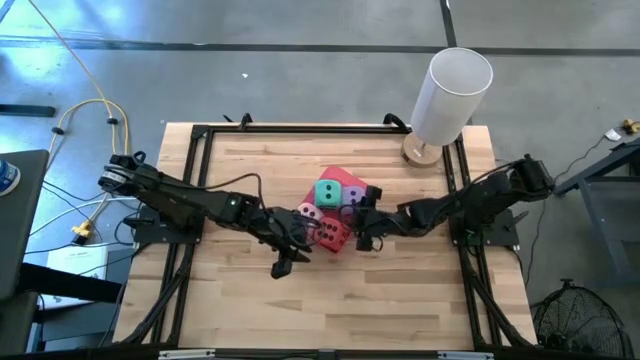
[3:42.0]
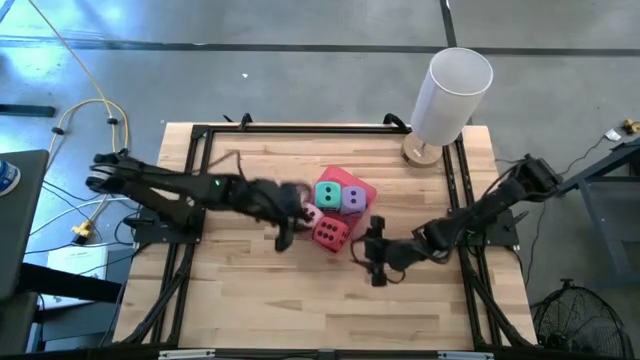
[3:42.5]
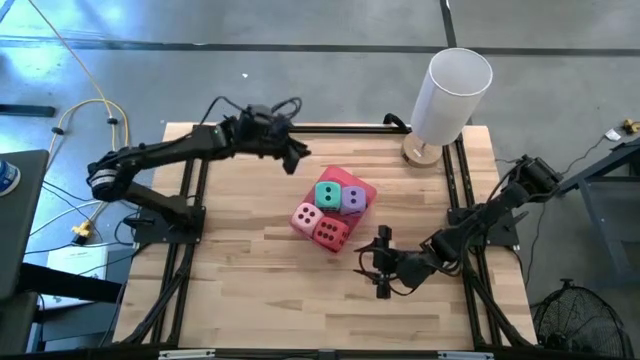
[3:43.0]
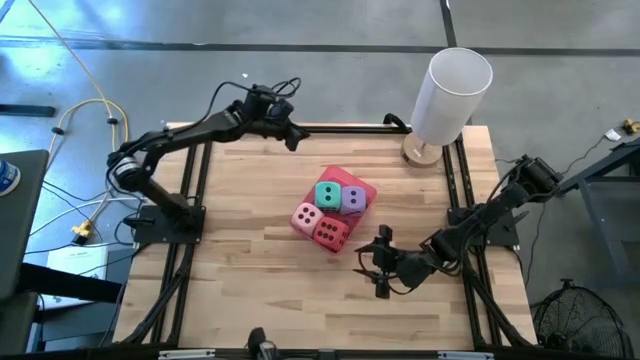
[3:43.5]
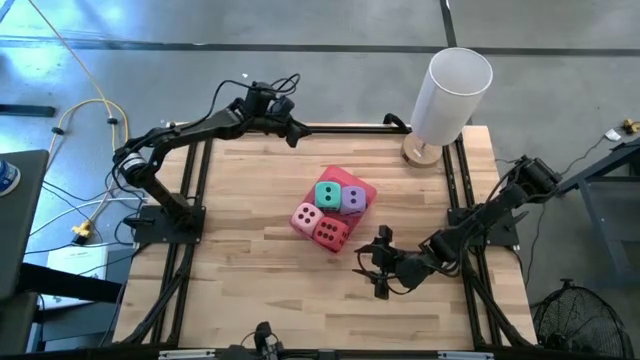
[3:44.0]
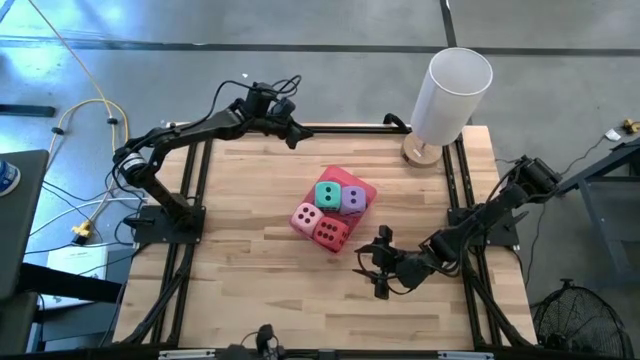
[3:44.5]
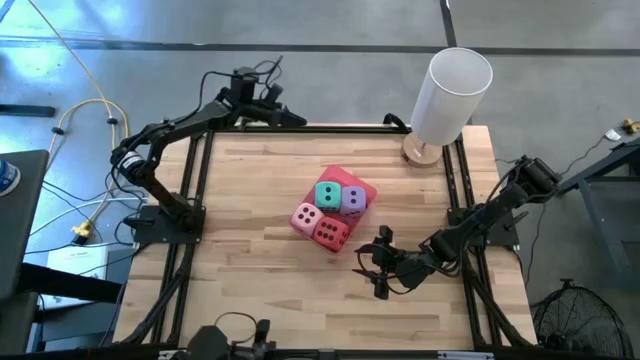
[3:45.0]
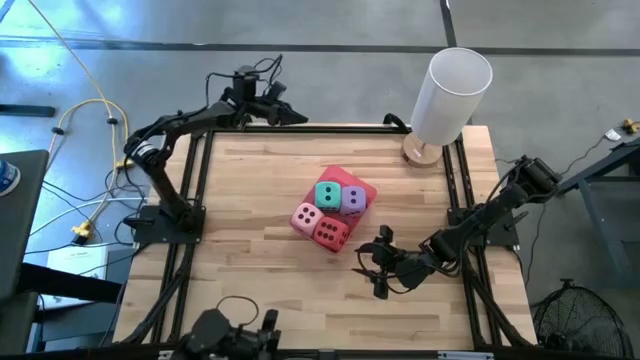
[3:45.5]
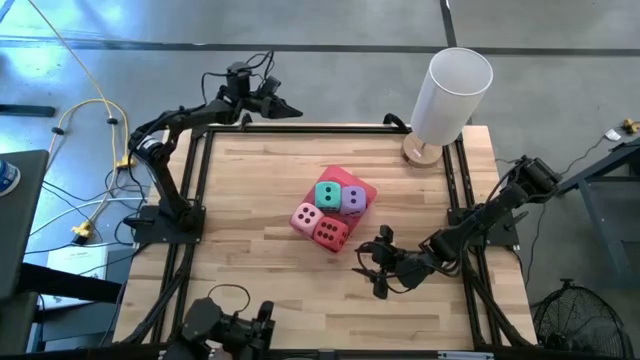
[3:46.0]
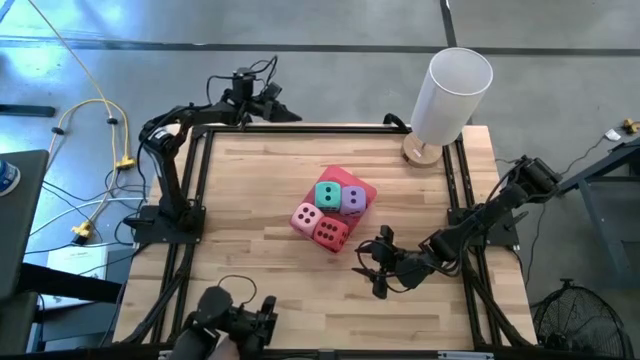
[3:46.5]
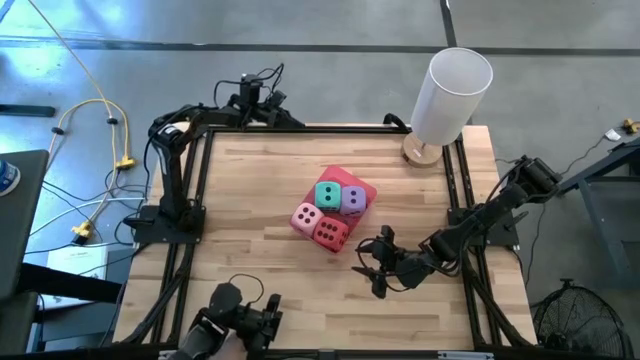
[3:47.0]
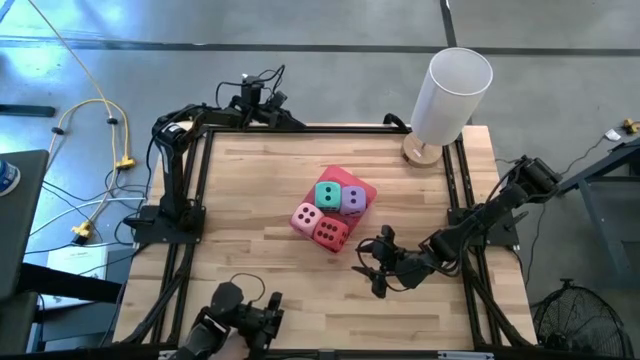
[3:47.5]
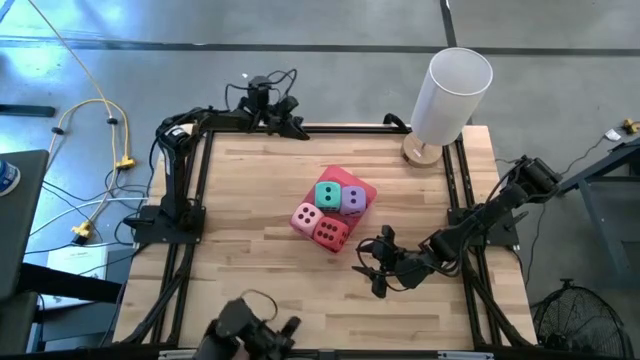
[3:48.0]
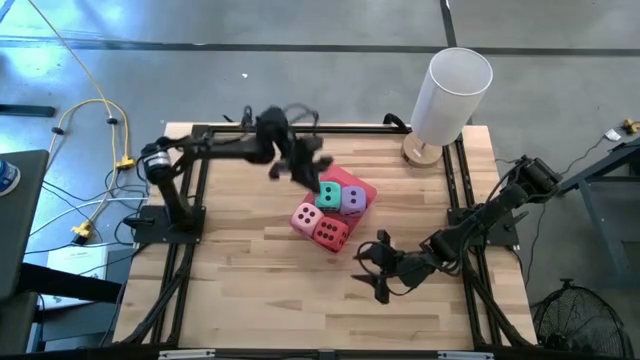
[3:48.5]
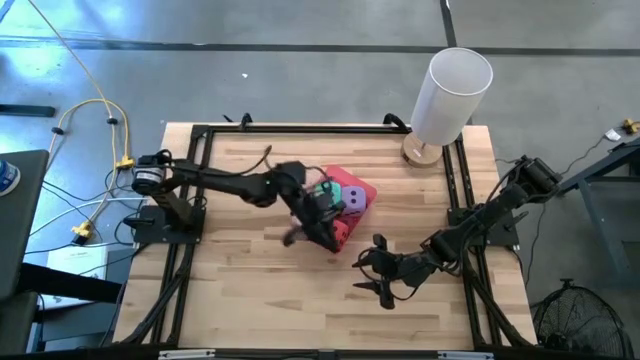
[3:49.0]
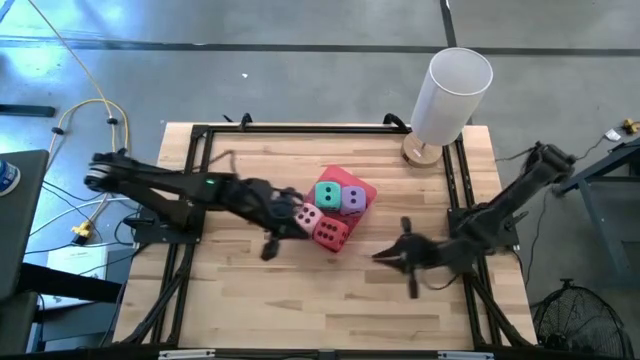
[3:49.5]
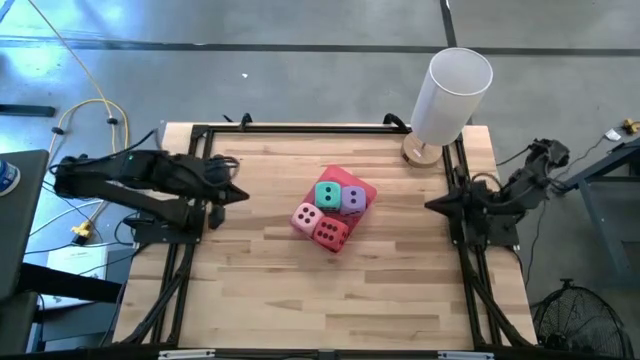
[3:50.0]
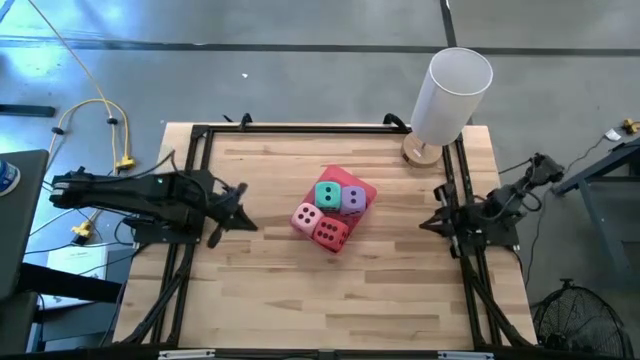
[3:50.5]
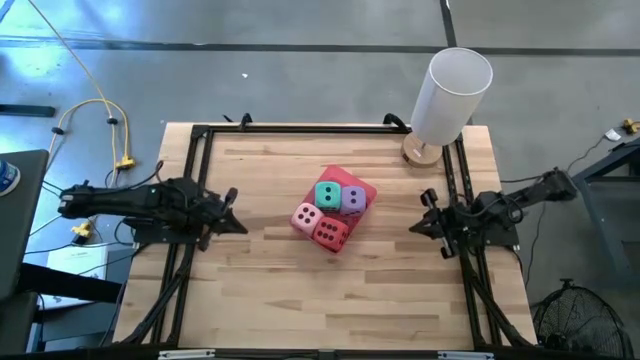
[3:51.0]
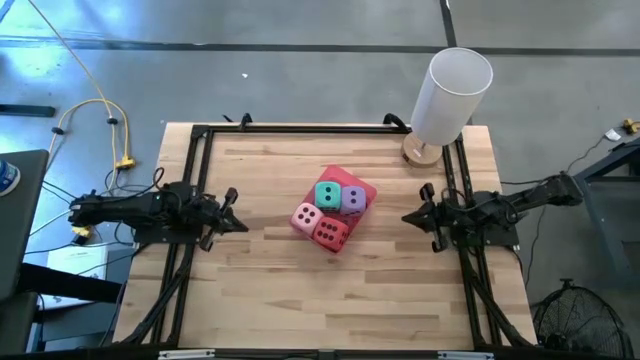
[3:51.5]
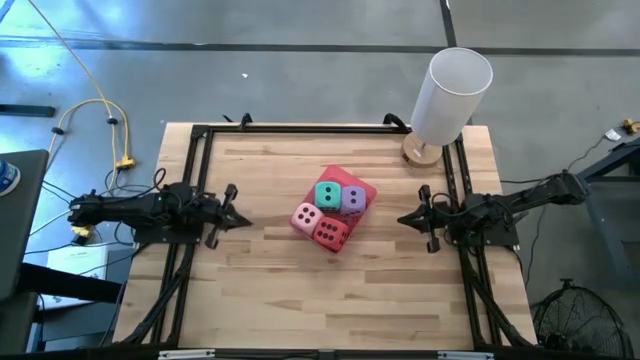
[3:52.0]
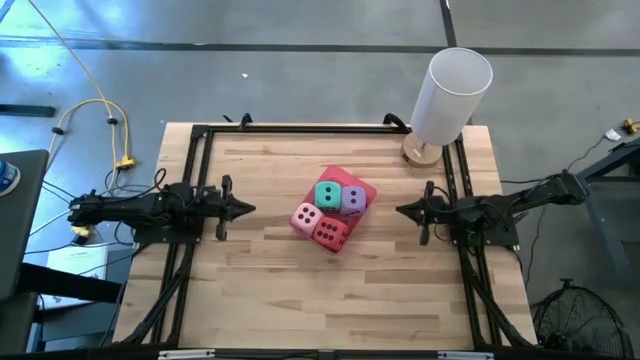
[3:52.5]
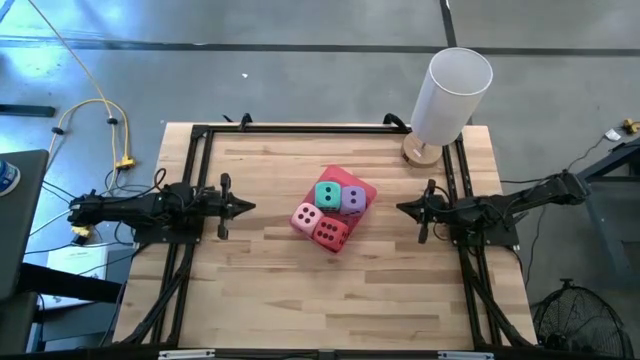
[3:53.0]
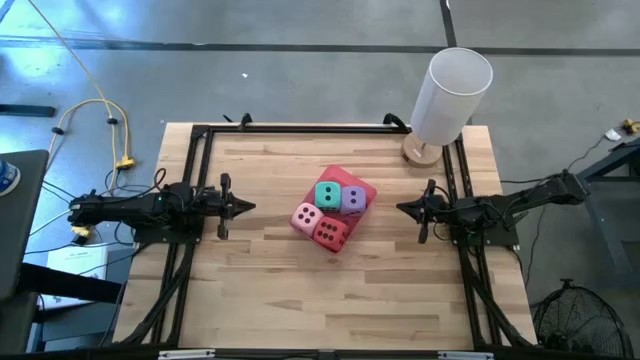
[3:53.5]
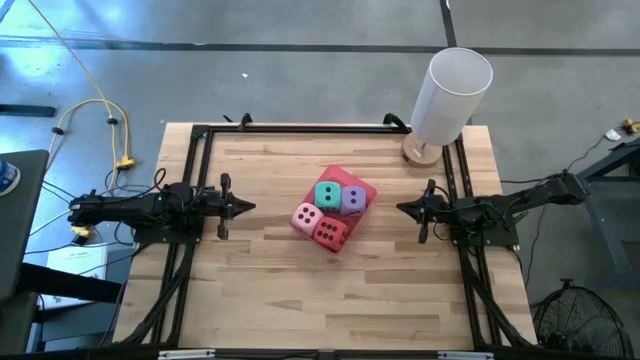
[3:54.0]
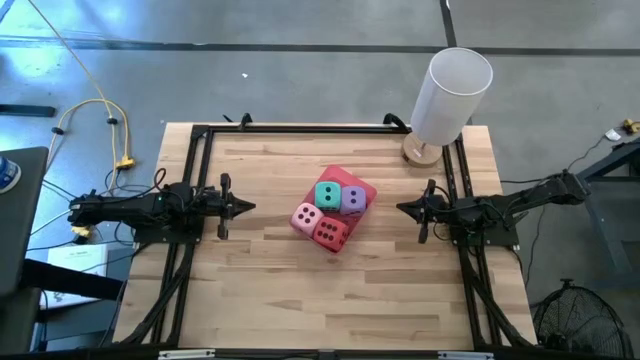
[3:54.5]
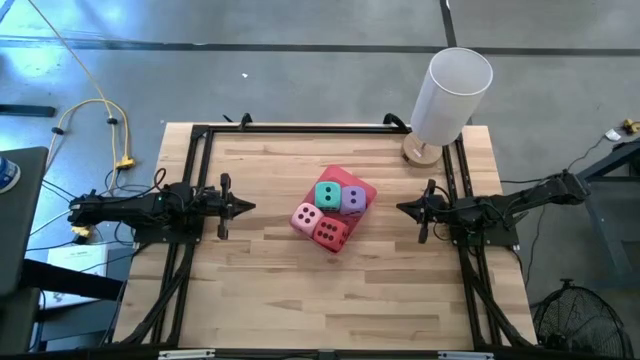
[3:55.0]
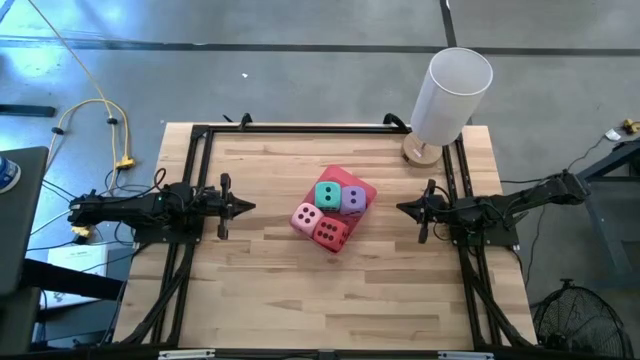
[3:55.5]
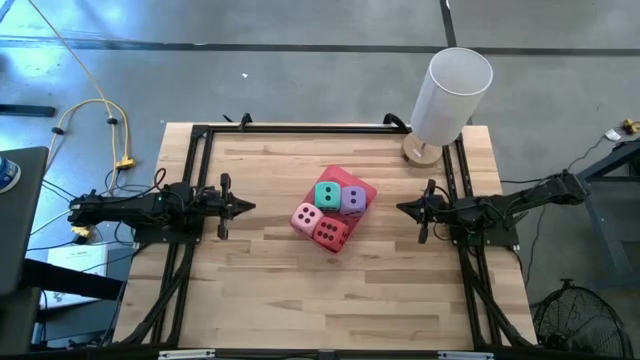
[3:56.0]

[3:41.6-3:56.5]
Task: Pick & Place Dice
Return to Home Position
